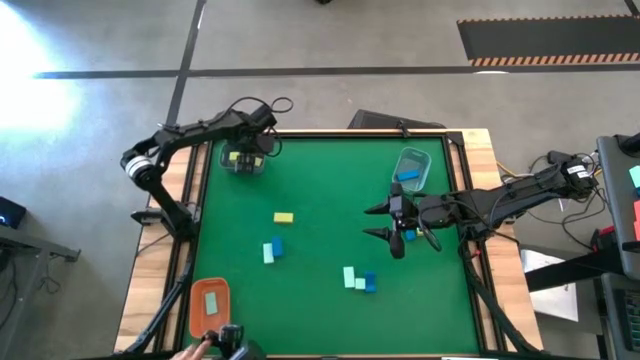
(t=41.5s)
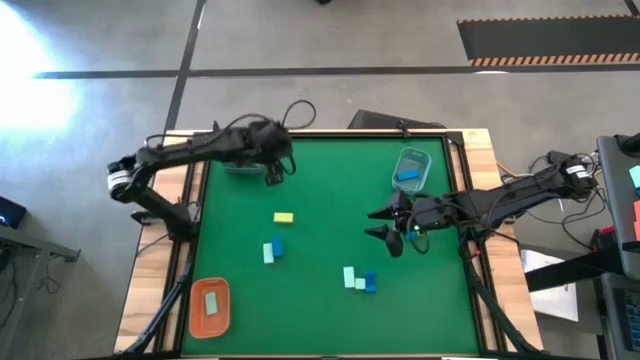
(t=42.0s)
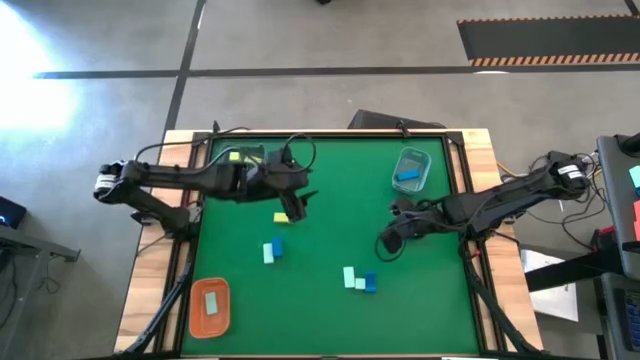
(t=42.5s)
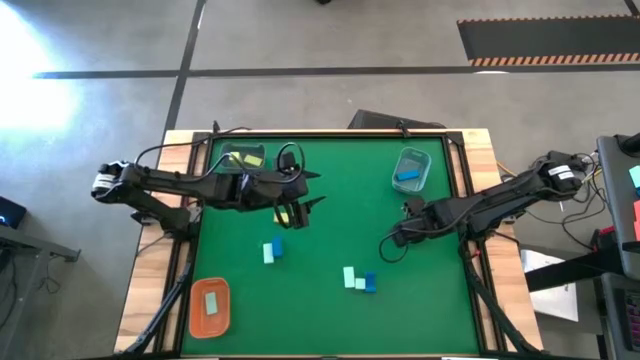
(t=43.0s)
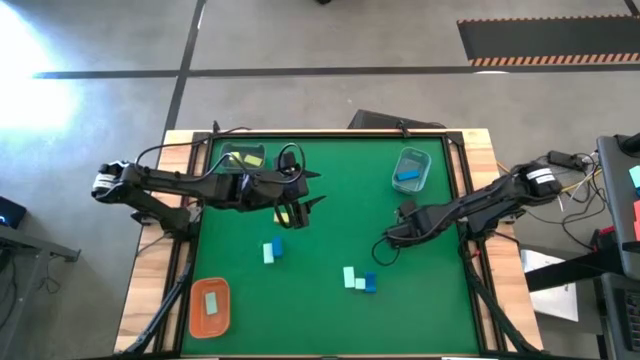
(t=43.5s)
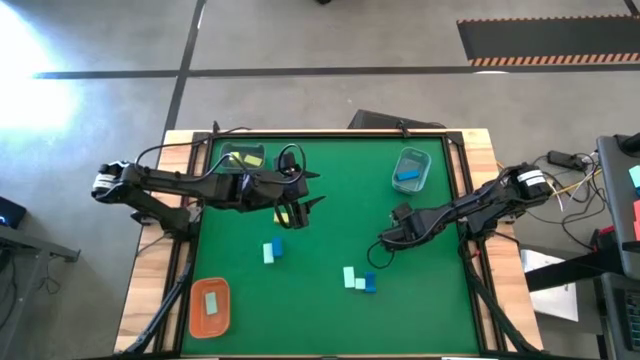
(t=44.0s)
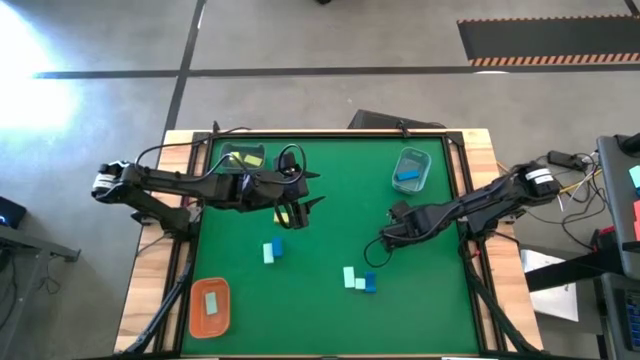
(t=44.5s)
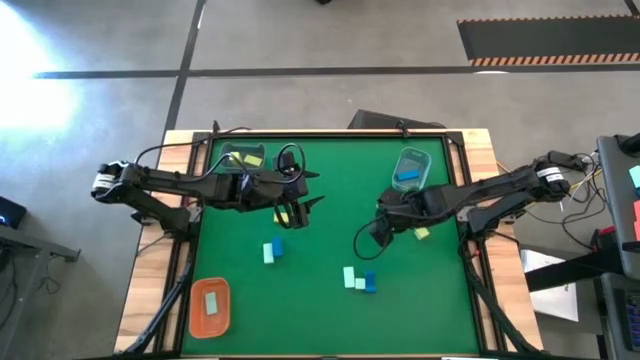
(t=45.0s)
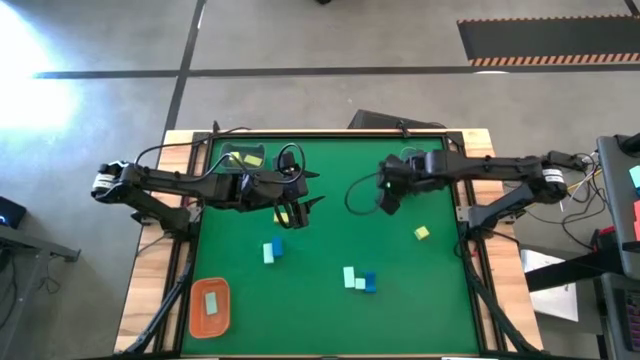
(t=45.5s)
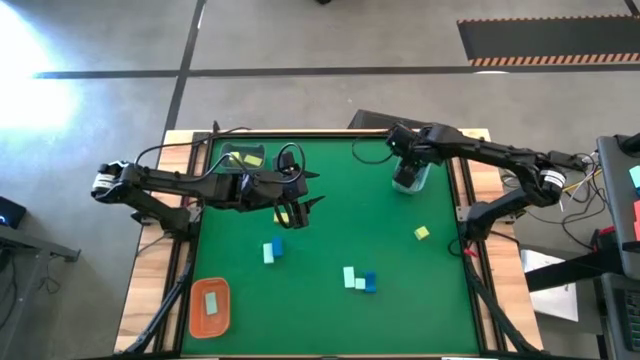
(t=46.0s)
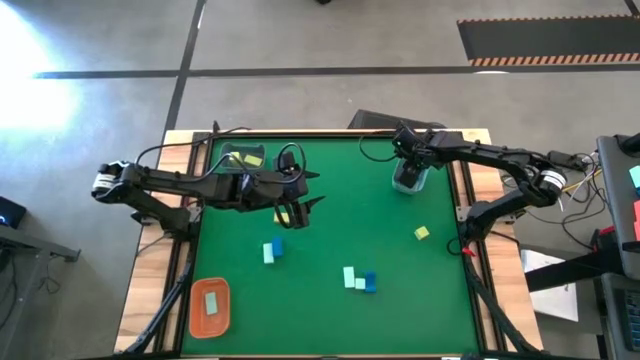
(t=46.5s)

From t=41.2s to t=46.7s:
Task: Sort & place blocks by color
Put the blue block into the light blue bin

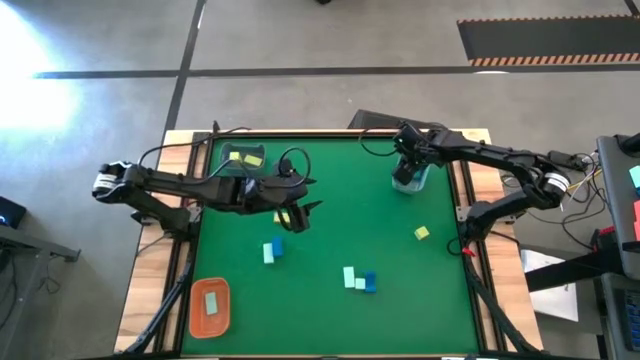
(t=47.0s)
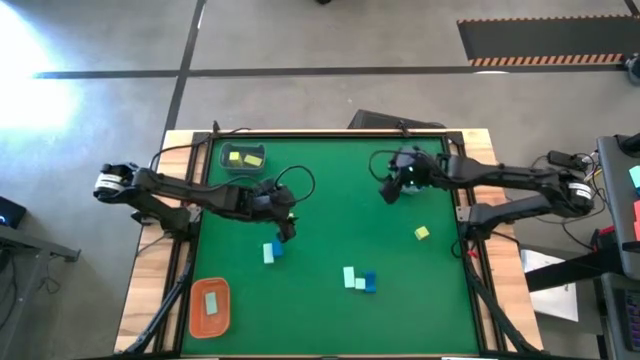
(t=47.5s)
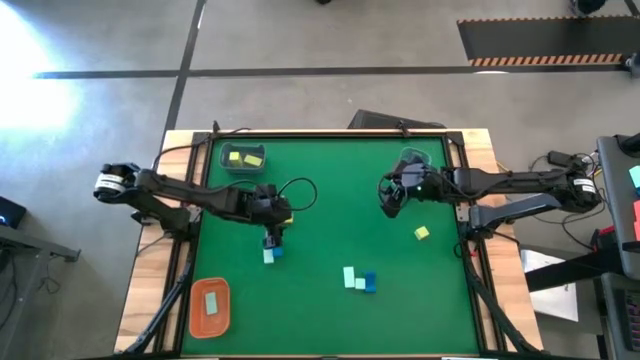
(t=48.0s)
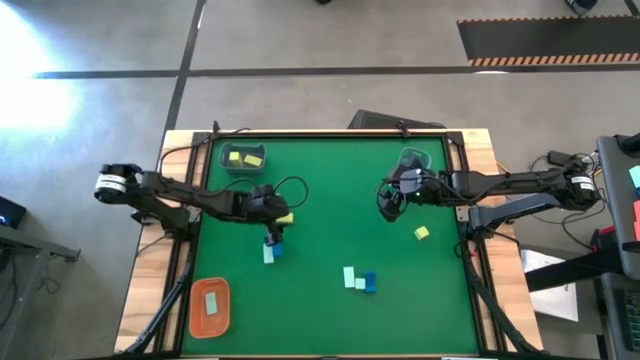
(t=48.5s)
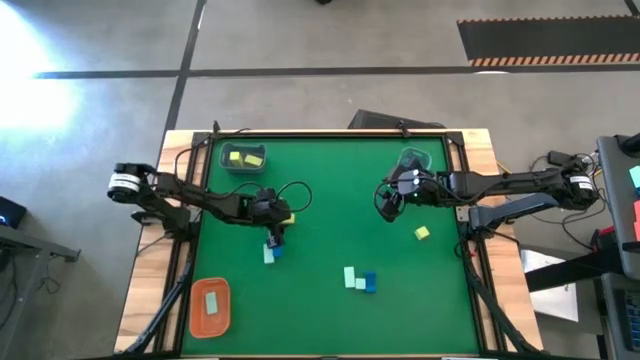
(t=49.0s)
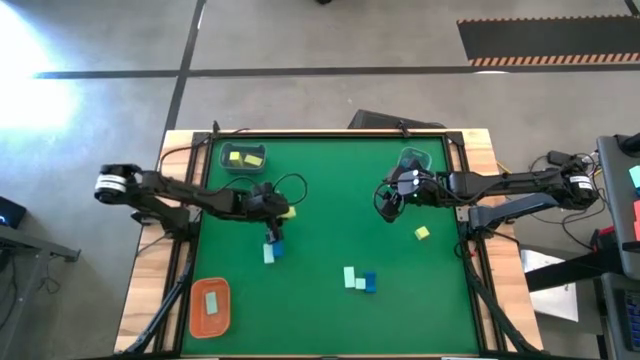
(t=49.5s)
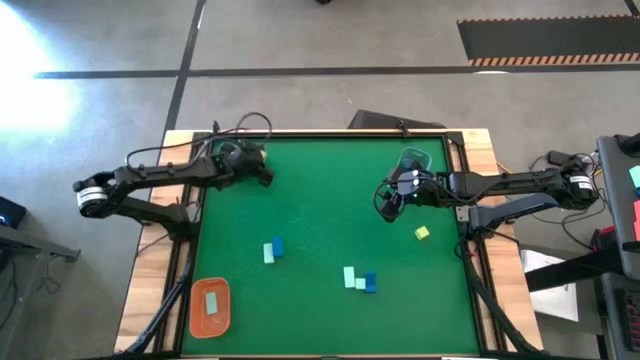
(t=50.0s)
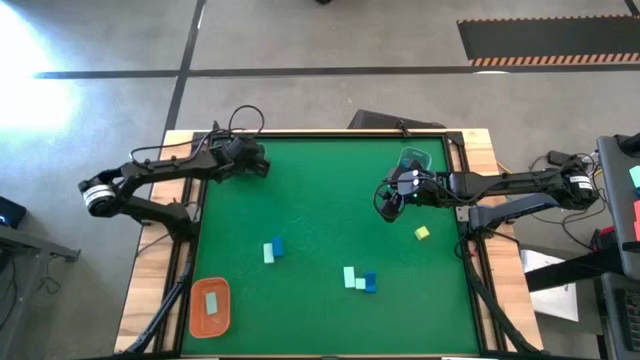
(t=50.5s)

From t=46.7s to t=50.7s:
Put the yellow block into the blue bin

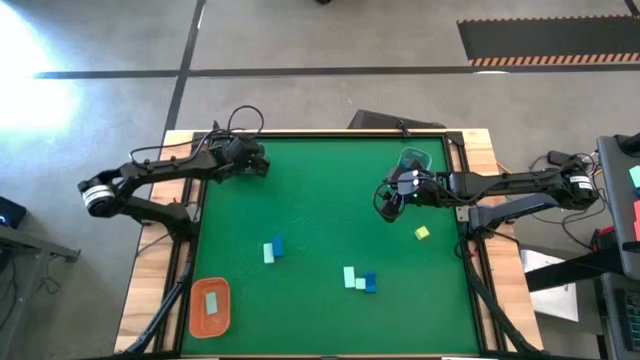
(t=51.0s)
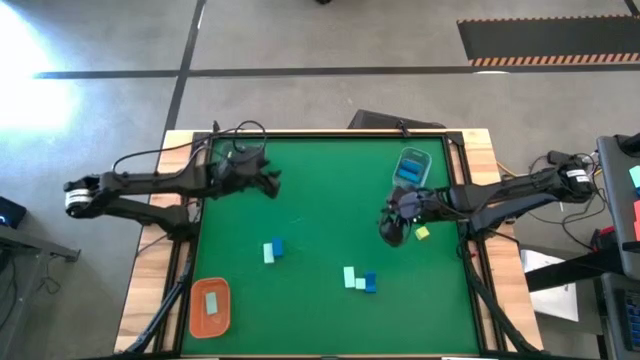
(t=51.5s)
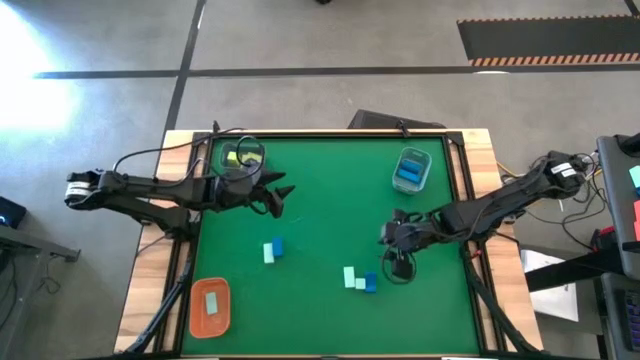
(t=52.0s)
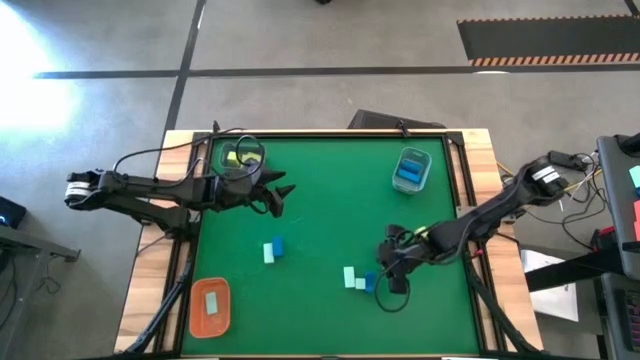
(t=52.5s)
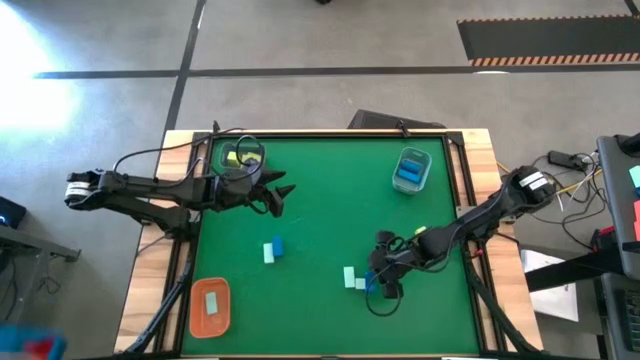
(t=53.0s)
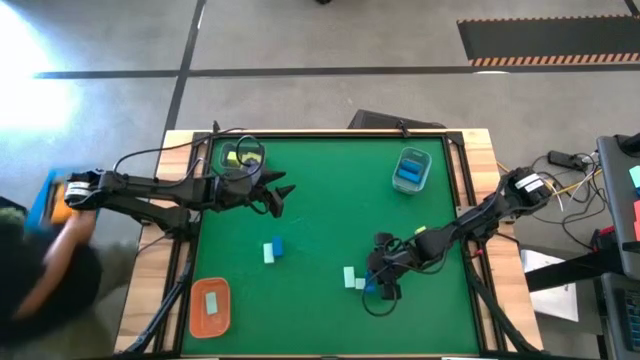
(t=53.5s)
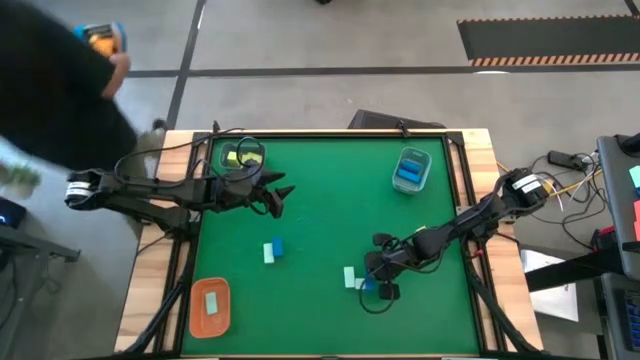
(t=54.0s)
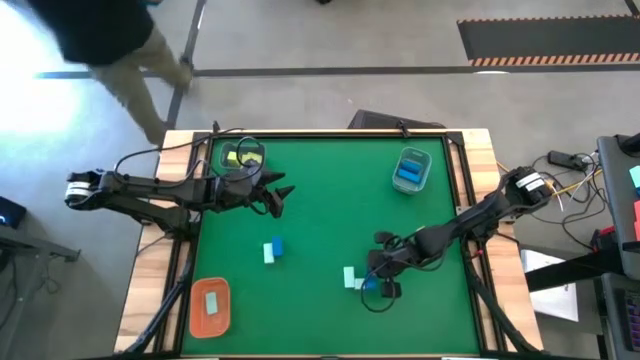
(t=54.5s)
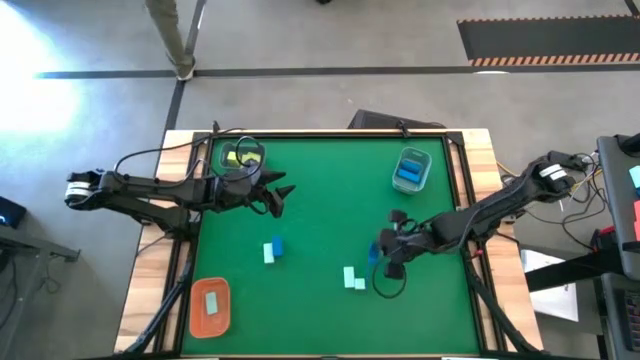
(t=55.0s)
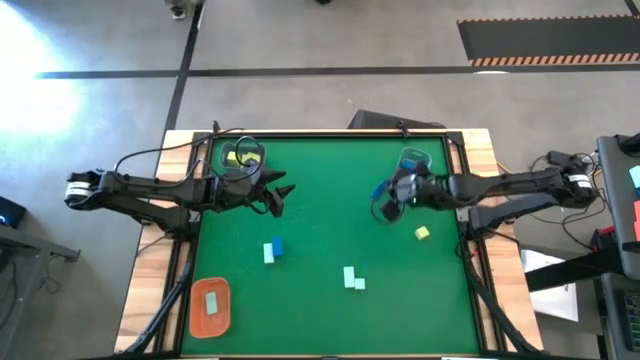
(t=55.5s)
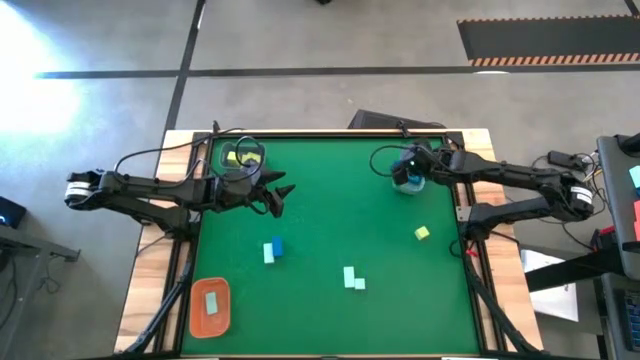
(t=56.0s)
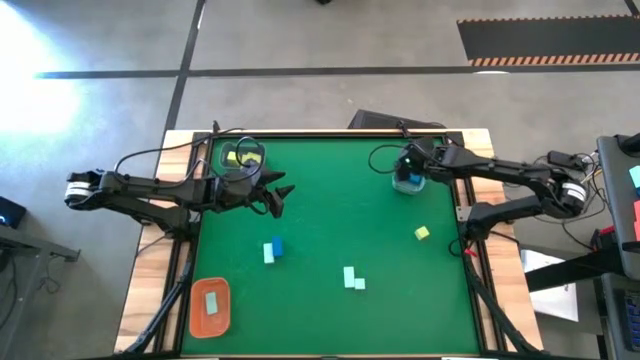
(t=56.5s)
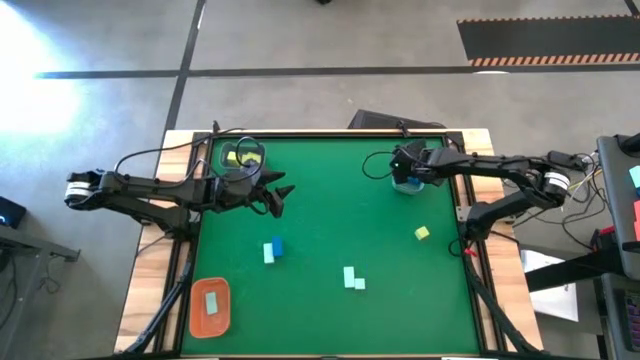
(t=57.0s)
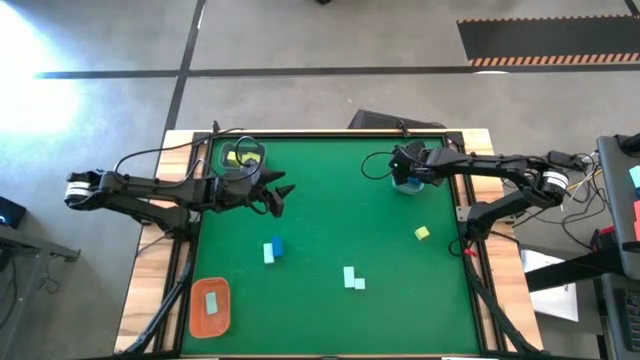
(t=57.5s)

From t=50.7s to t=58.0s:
Put the blue block into the light blue bin

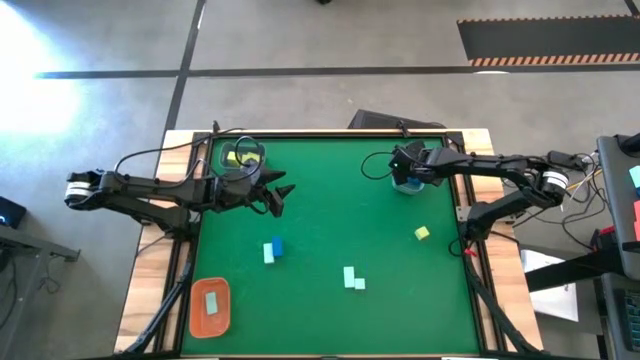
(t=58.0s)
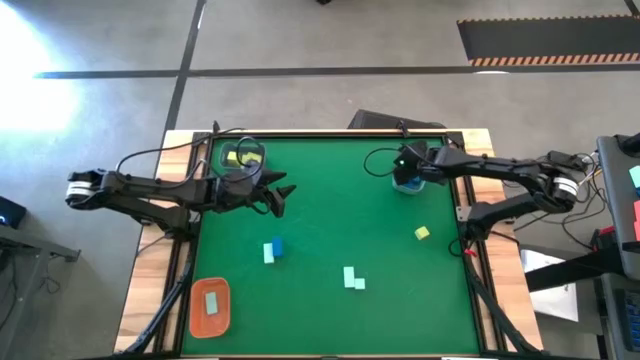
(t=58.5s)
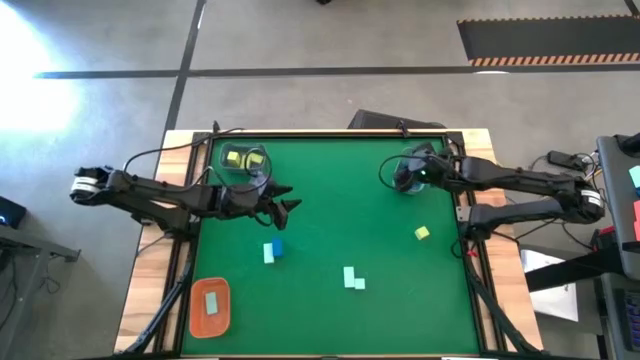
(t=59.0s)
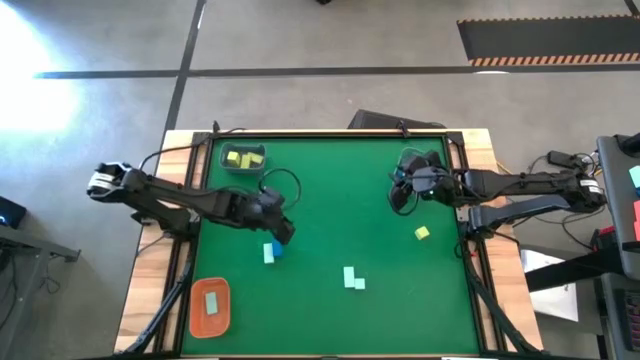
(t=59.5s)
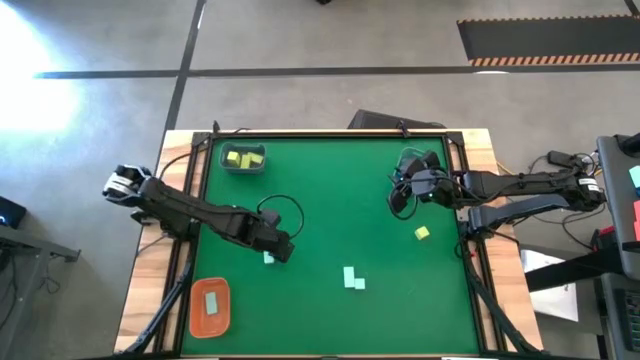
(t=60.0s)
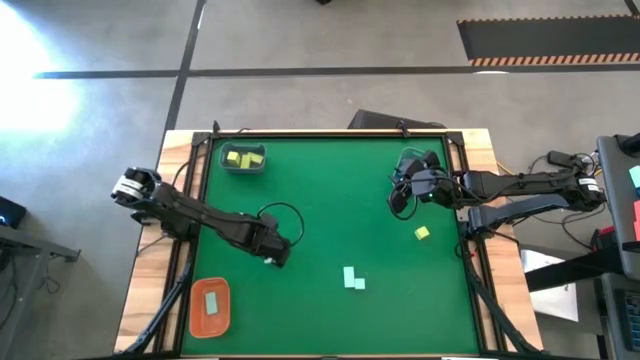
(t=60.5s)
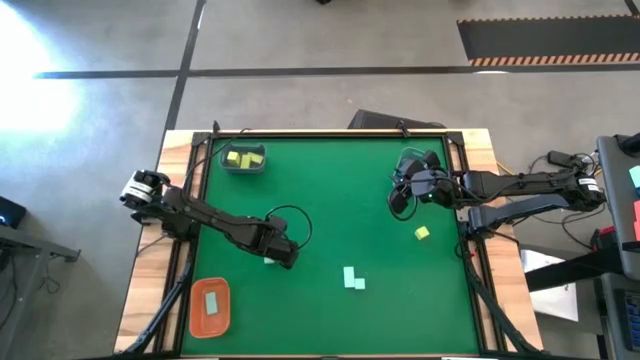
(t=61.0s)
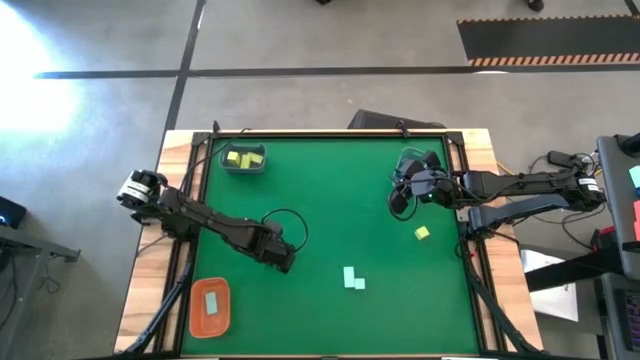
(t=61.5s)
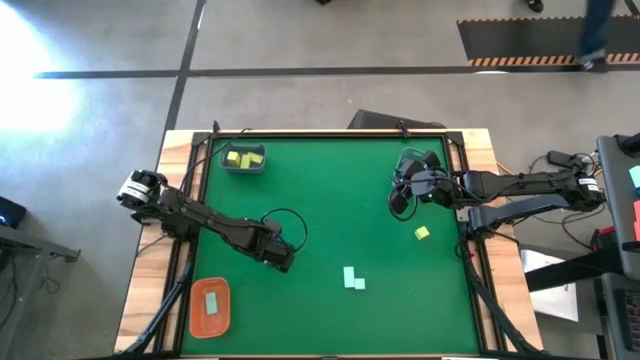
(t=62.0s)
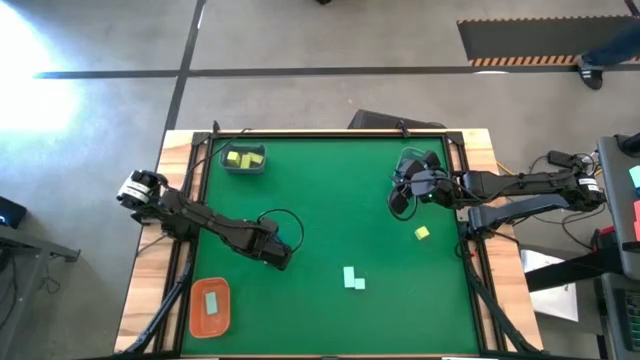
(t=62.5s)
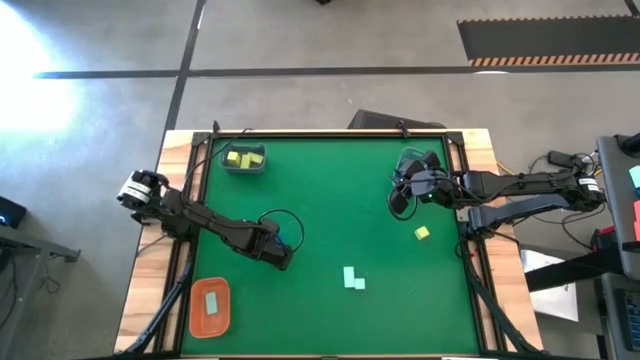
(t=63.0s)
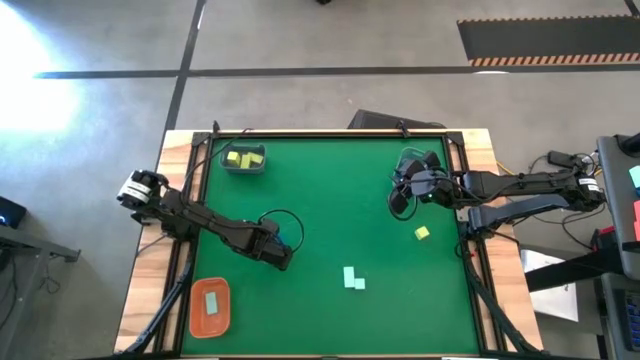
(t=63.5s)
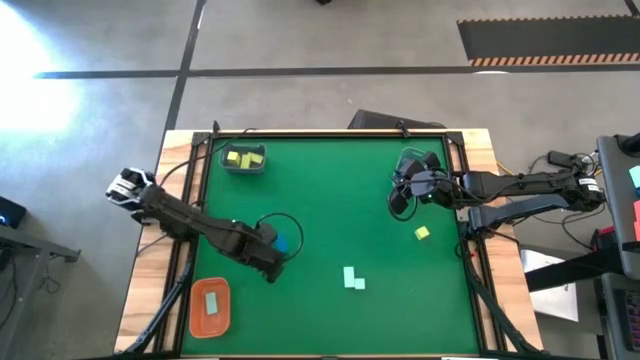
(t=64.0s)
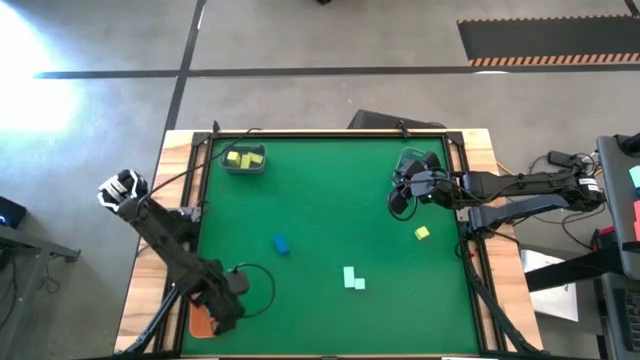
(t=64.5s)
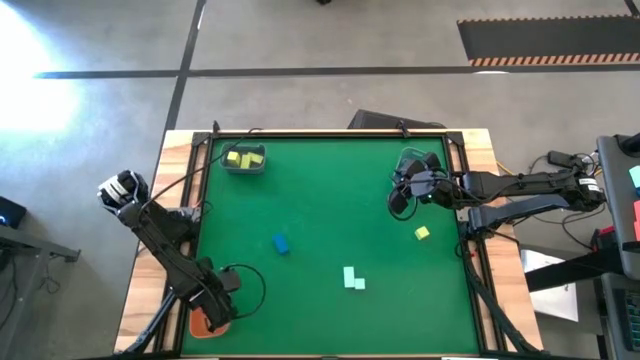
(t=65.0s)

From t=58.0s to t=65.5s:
Put the light blue block into the orange bin
